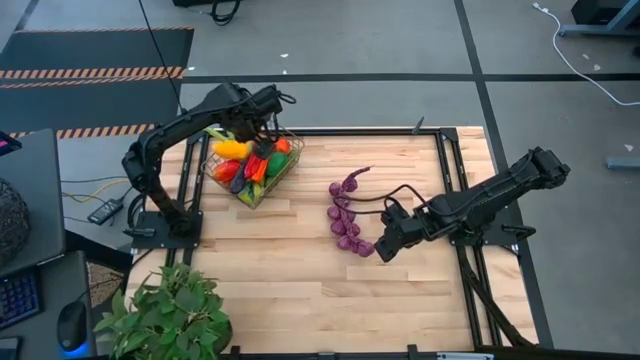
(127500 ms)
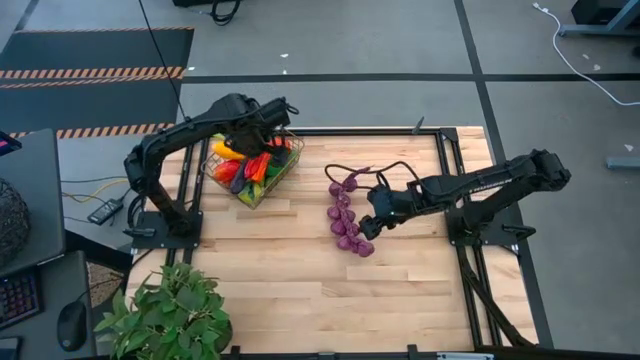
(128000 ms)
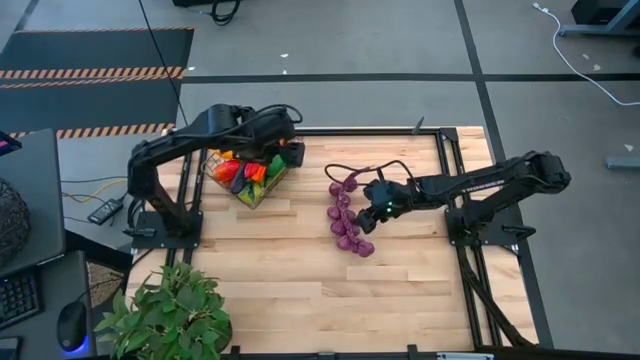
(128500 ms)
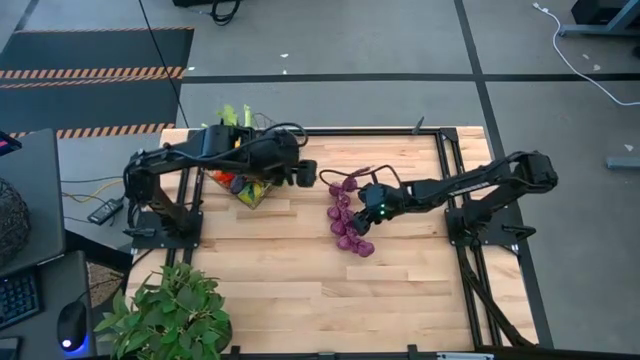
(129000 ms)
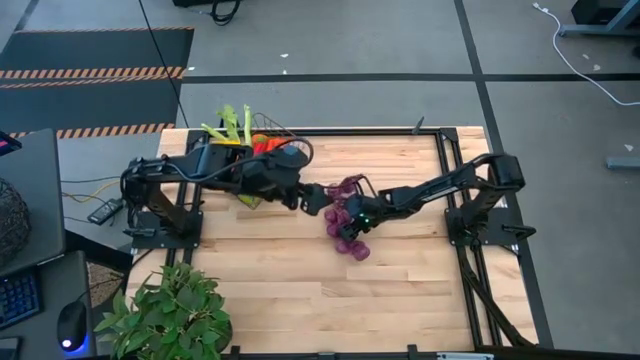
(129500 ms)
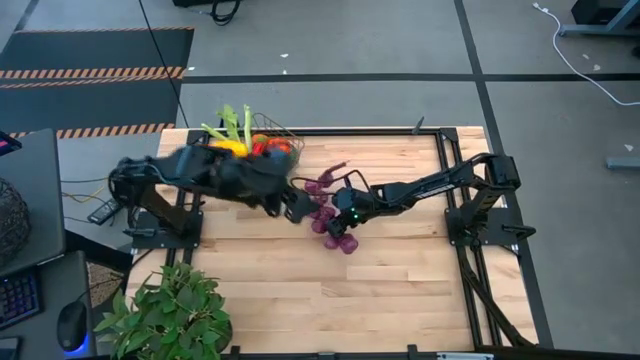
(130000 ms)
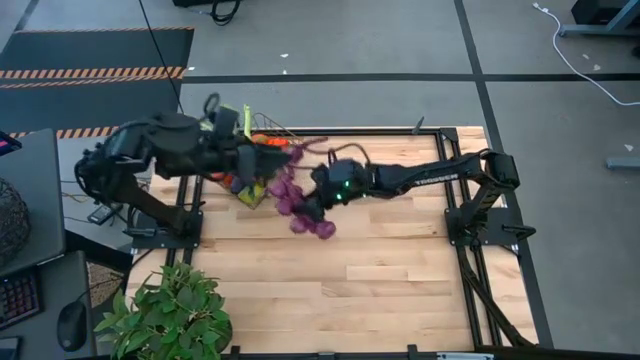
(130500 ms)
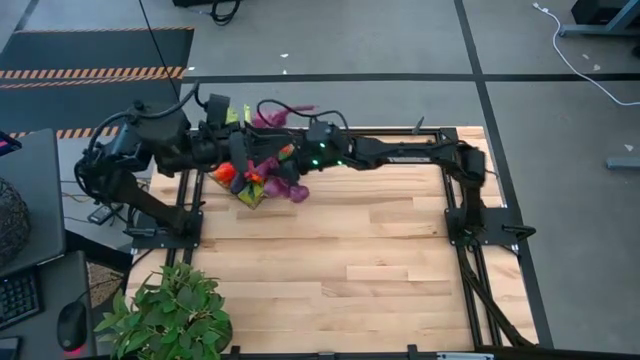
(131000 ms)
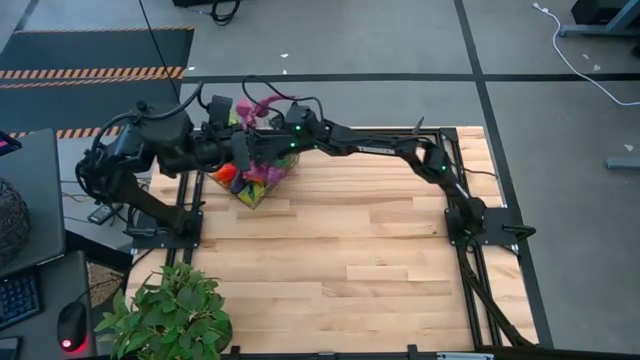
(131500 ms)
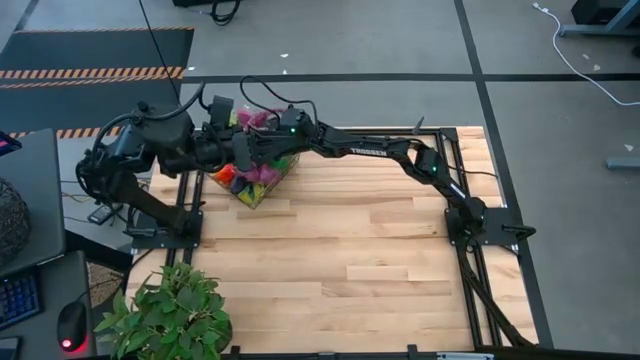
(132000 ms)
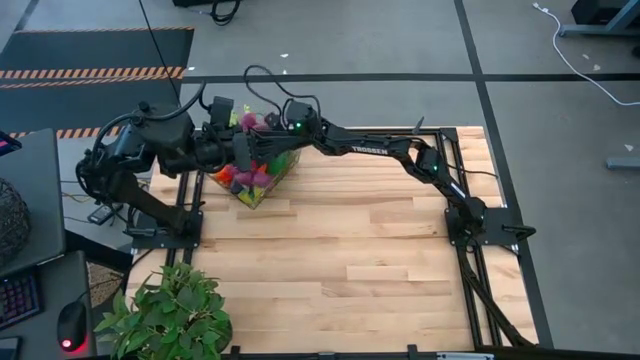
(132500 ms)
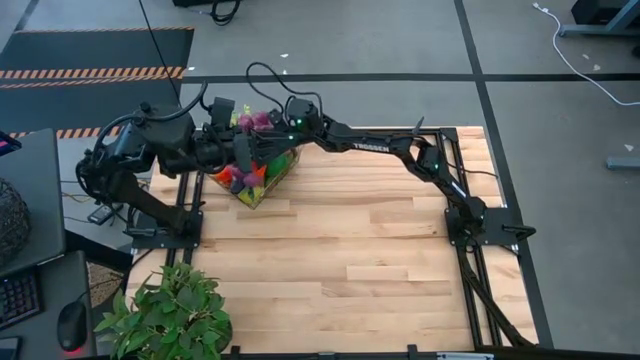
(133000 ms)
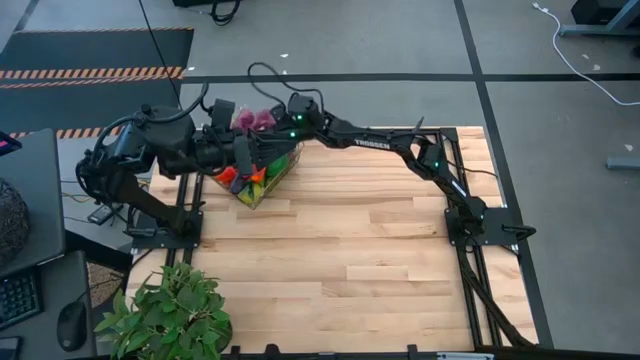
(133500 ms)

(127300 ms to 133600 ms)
Task: Build produce basket
Put the purple garlic into the wire basket

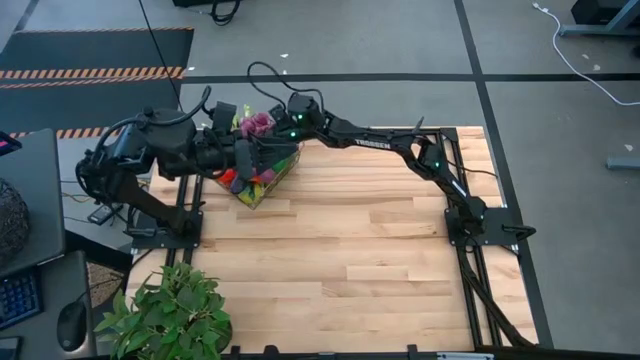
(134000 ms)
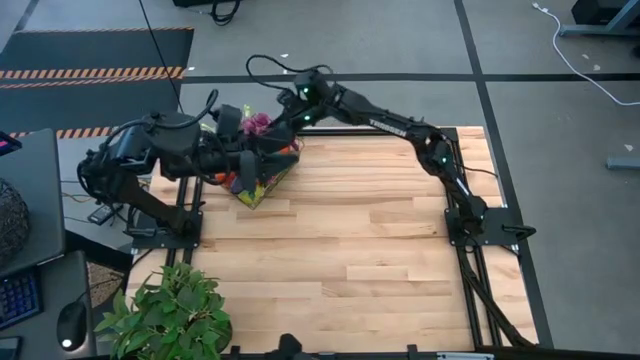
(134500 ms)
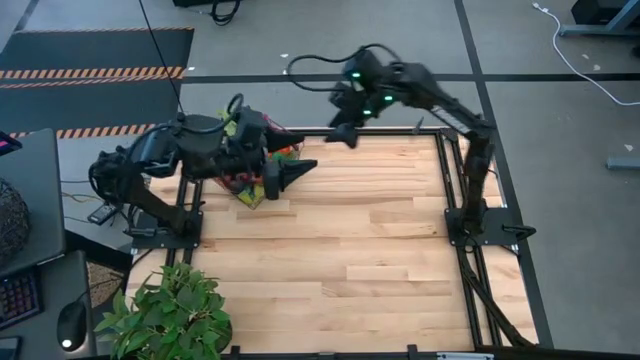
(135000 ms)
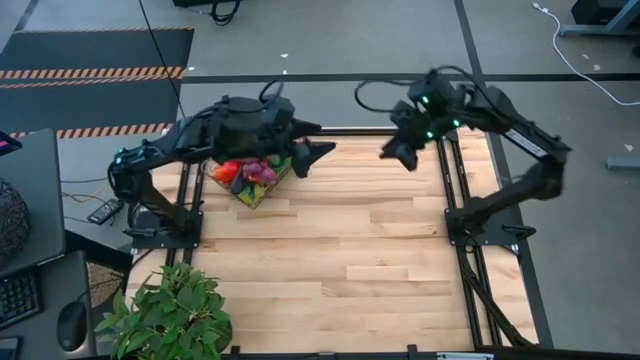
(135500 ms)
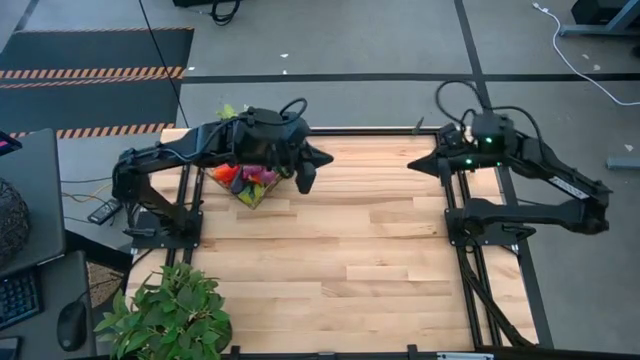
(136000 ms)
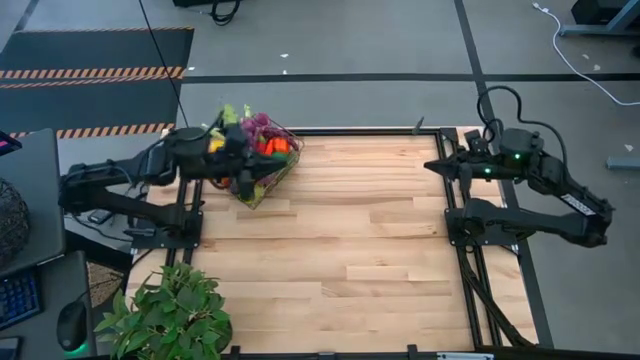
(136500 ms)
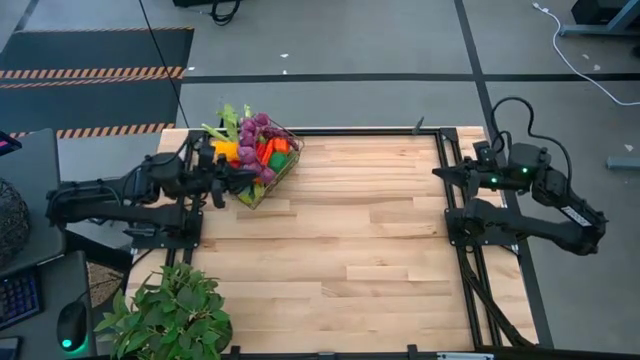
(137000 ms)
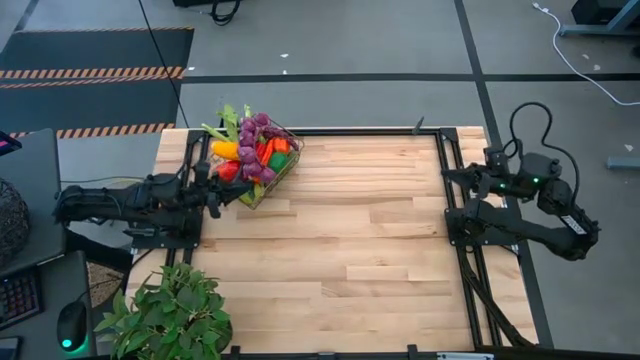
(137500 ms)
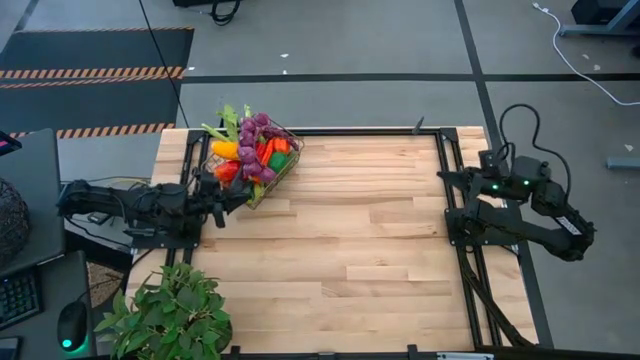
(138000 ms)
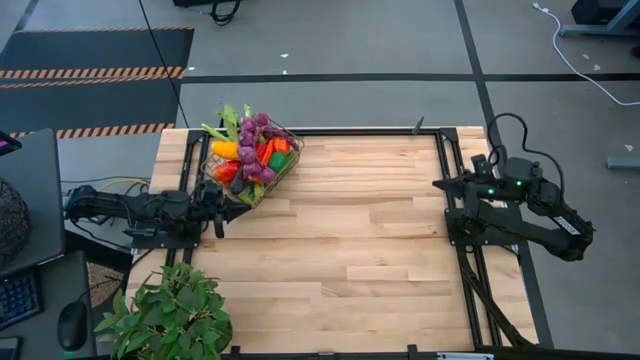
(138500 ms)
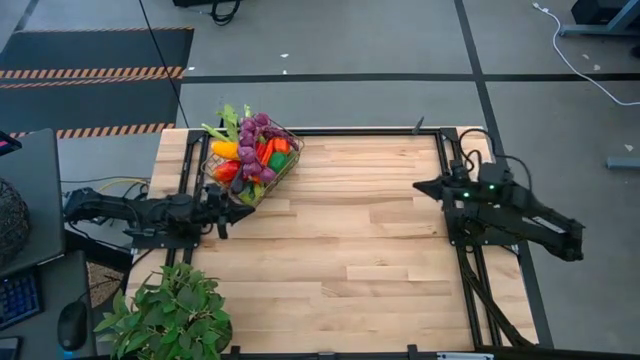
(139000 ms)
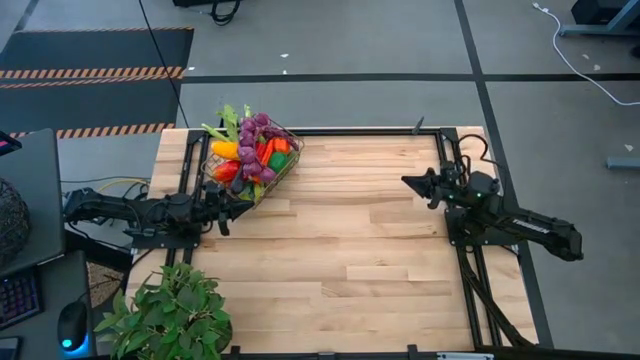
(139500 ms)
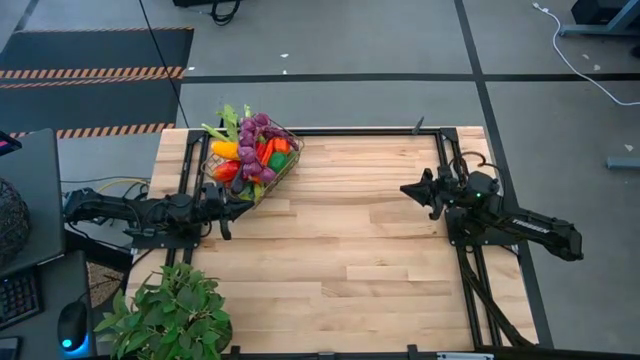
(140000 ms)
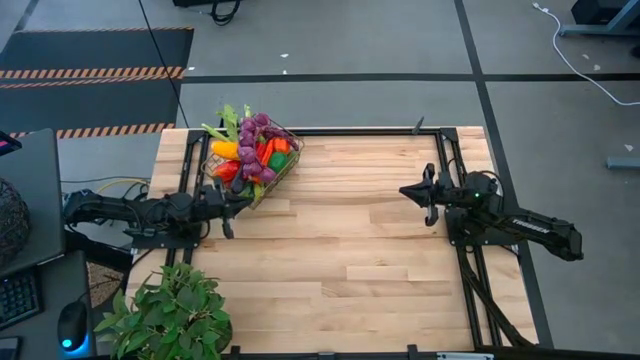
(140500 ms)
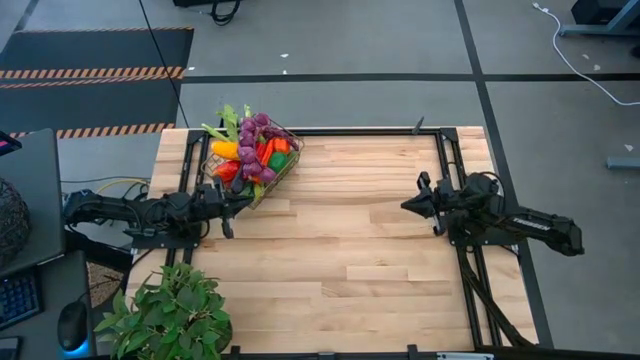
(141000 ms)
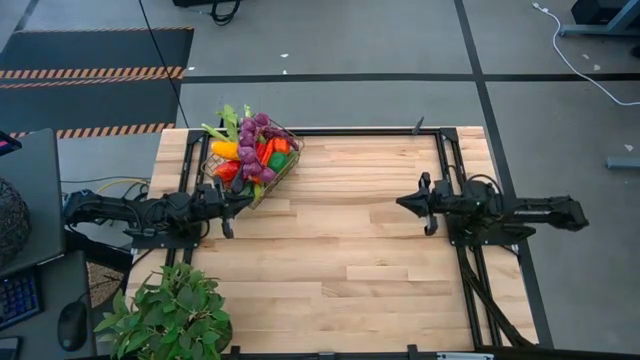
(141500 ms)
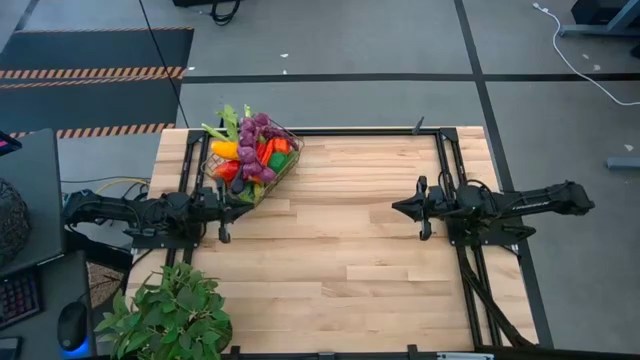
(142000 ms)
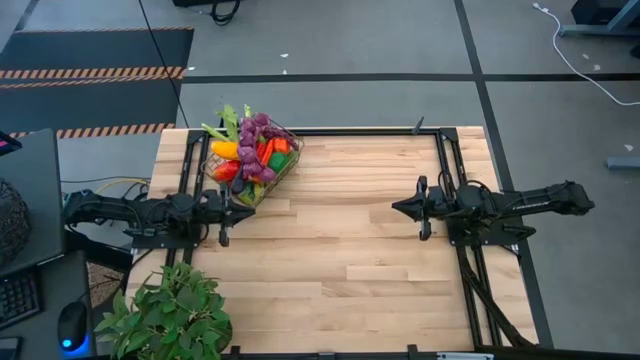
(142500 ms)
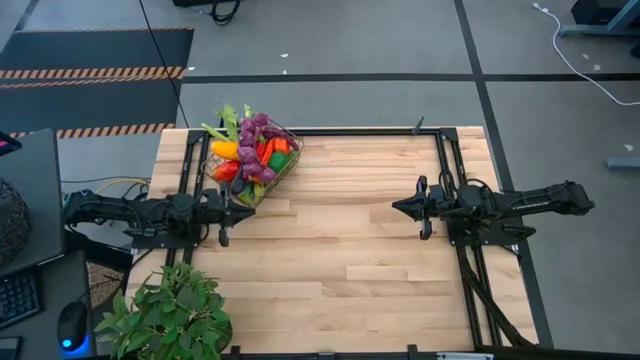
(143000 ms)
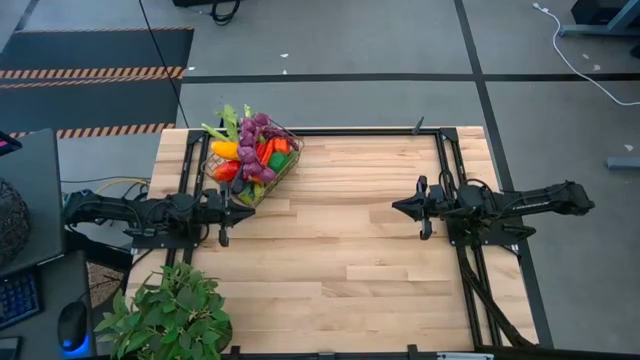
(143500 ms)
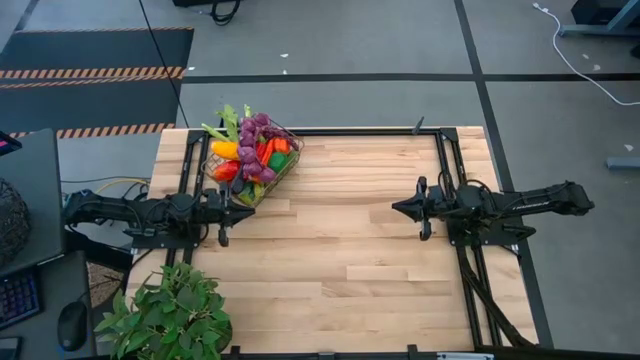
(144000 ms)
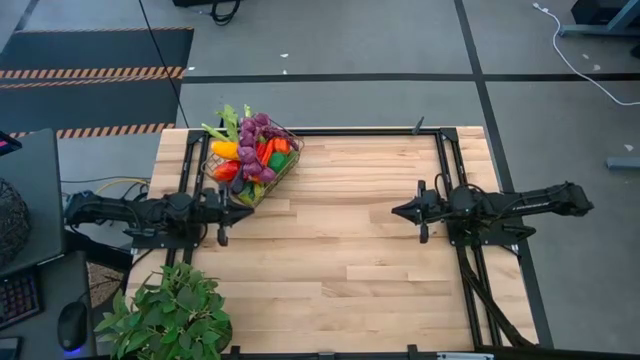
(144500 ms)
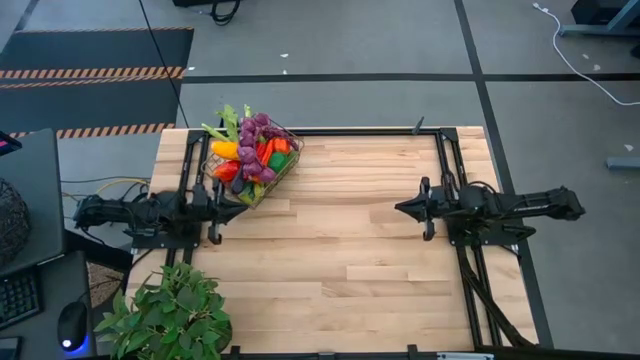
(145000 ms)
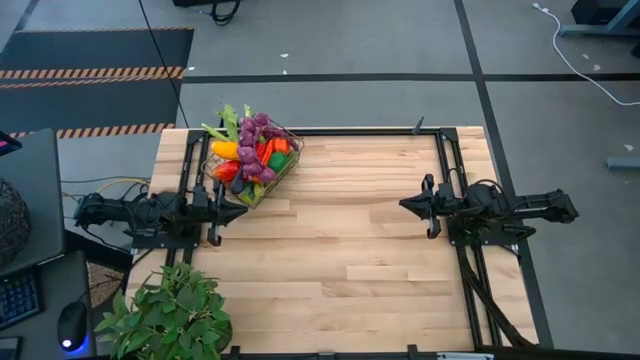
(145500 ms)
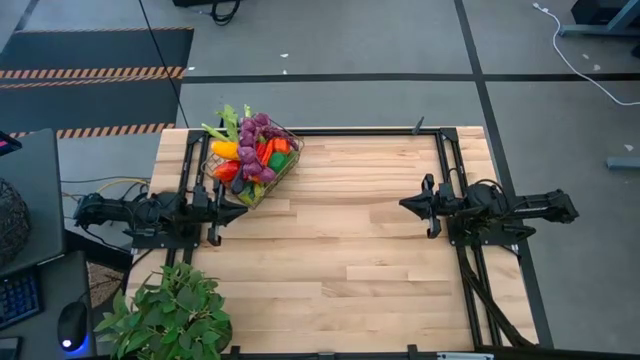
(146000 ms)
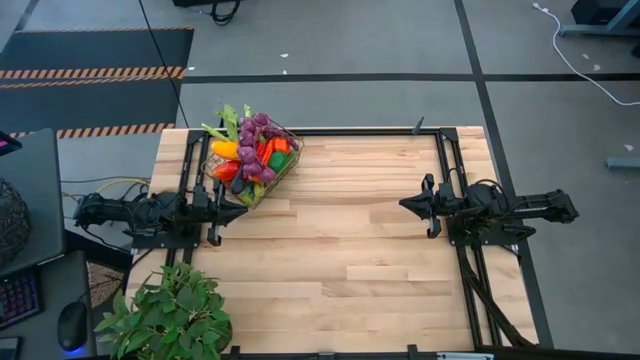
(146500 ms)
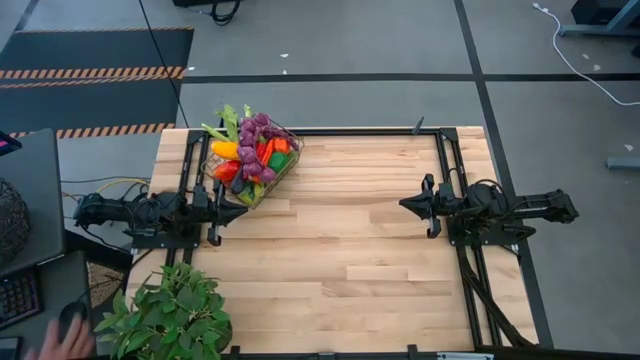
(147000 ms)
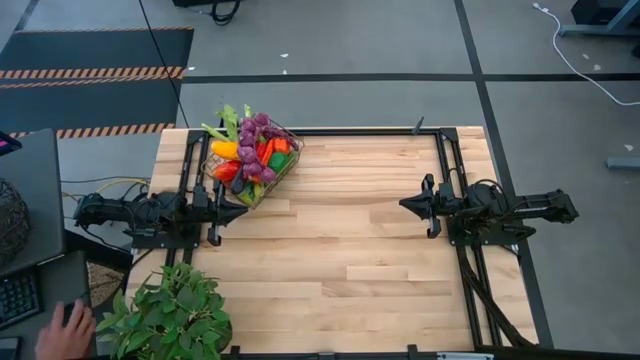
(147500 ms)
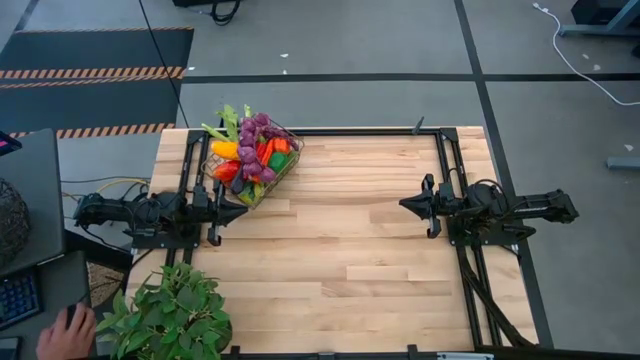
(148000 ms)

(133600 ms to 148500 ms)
Return to Home Position
